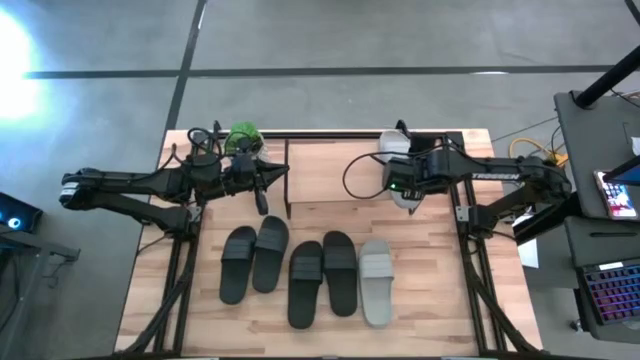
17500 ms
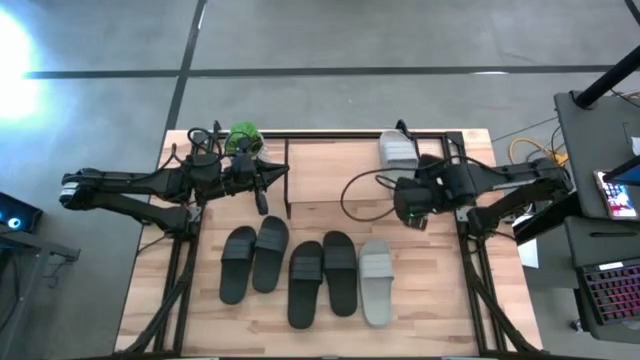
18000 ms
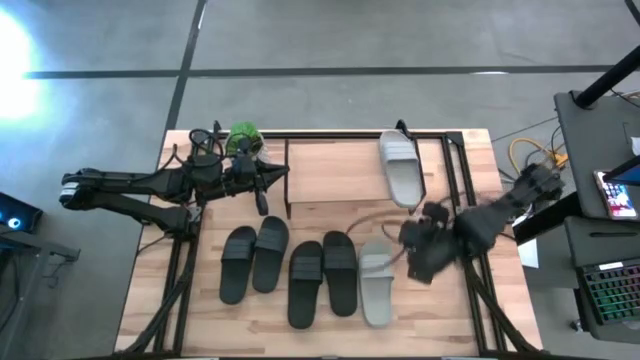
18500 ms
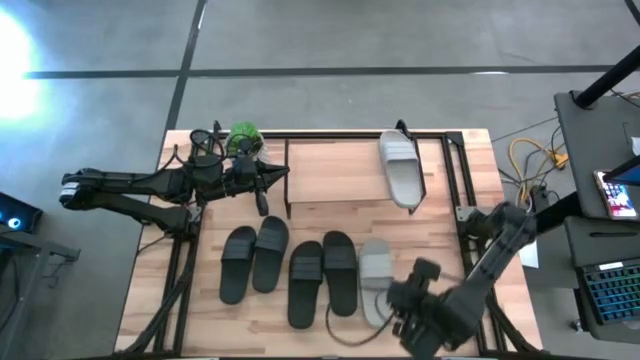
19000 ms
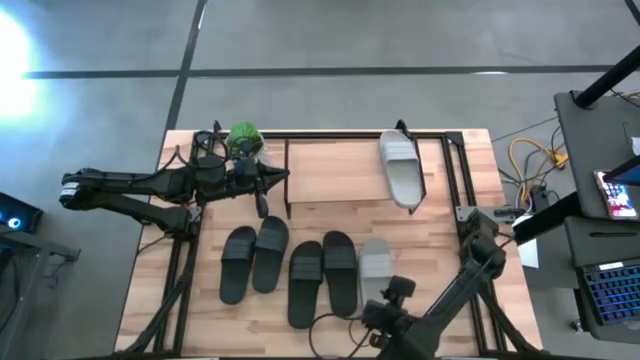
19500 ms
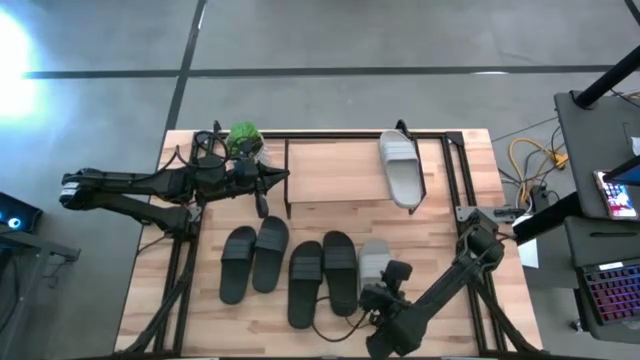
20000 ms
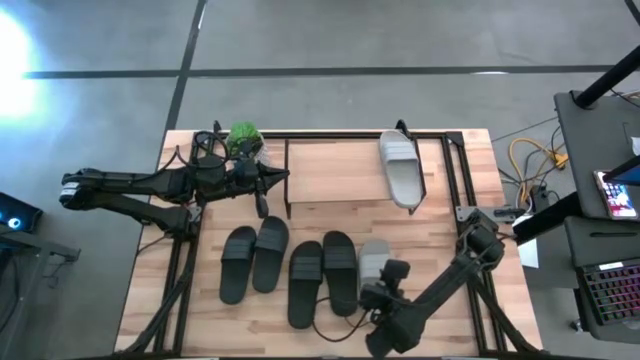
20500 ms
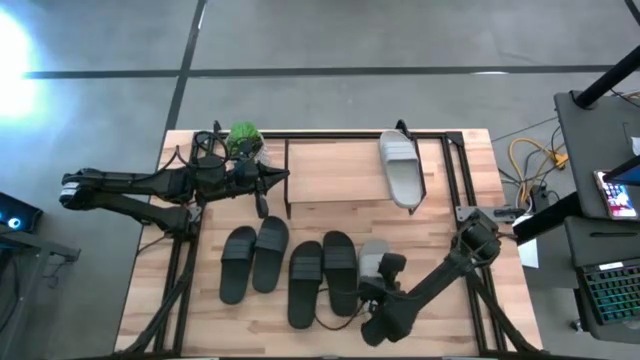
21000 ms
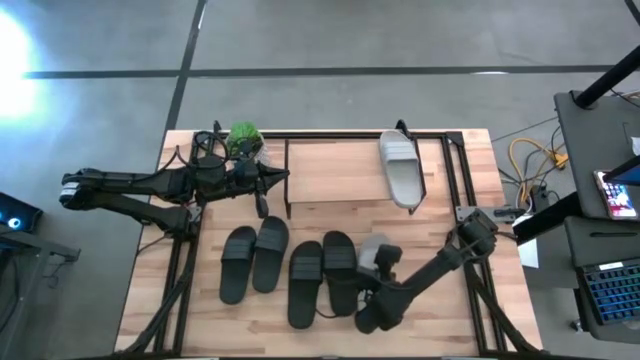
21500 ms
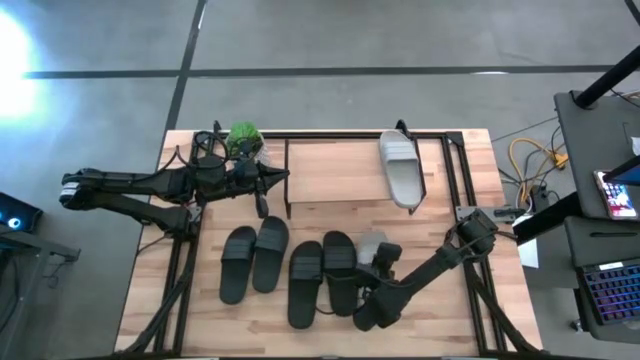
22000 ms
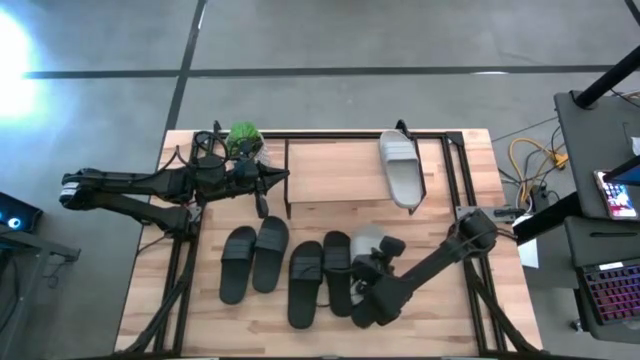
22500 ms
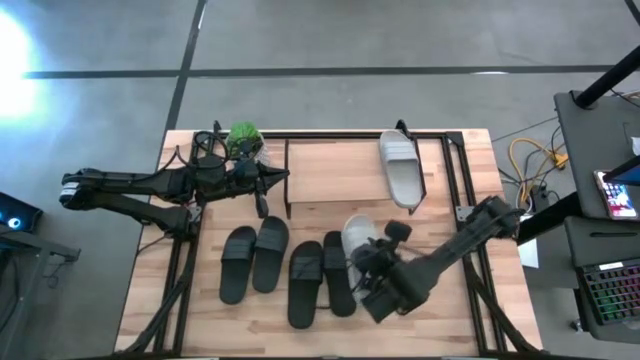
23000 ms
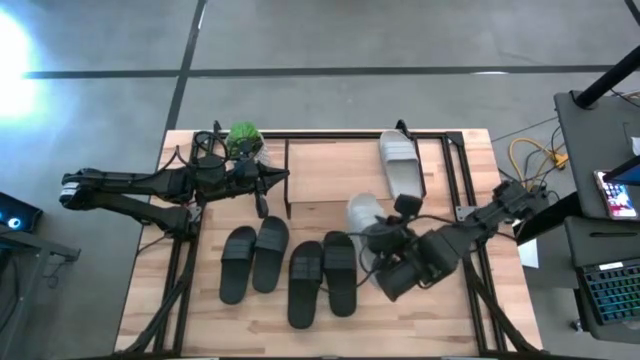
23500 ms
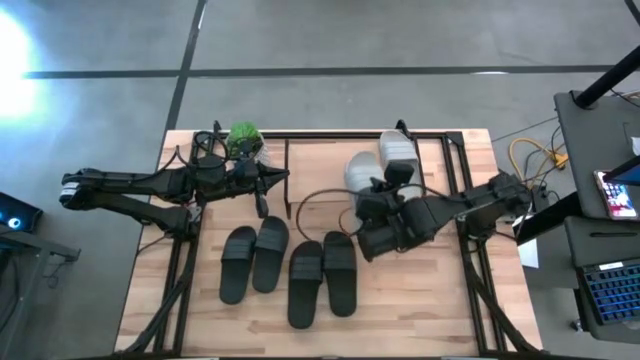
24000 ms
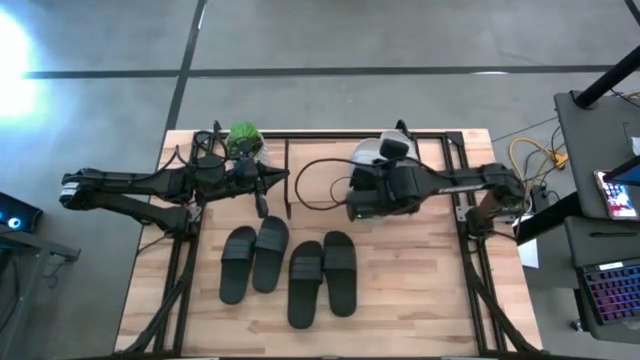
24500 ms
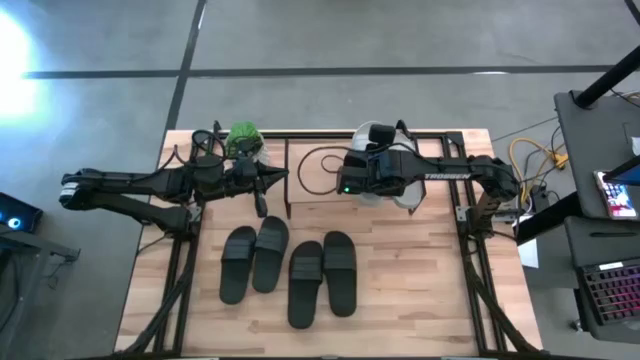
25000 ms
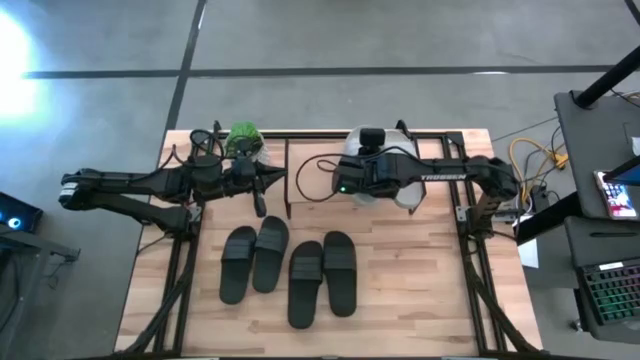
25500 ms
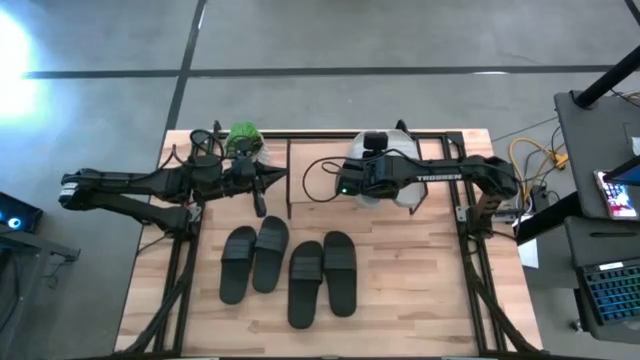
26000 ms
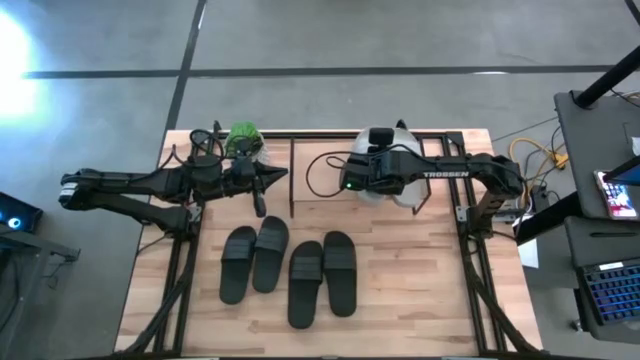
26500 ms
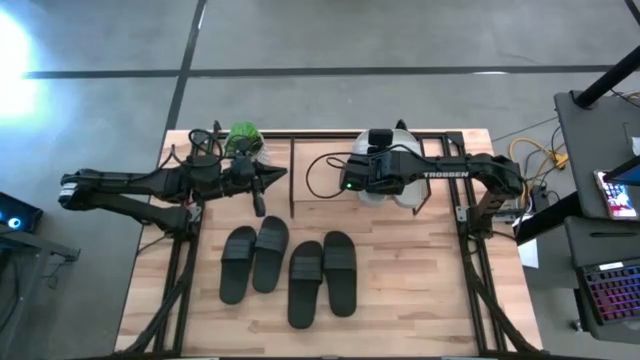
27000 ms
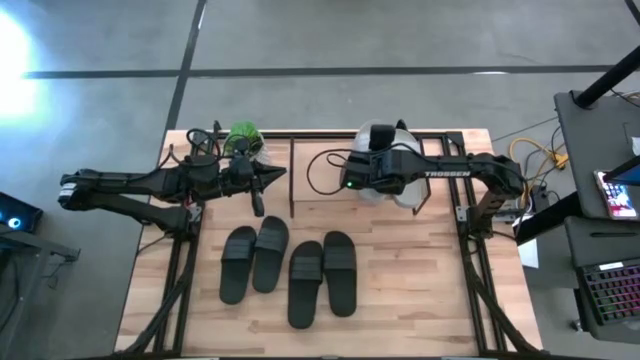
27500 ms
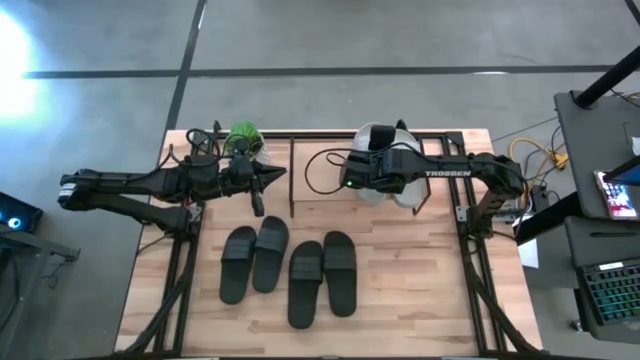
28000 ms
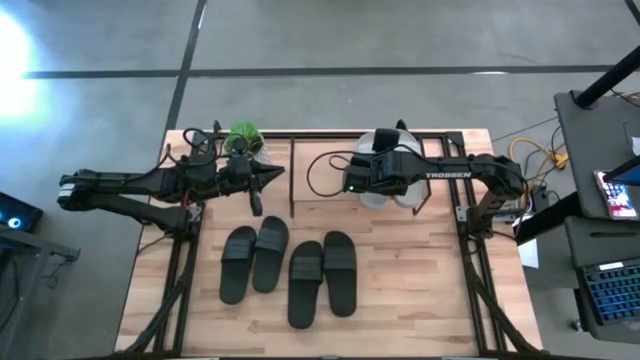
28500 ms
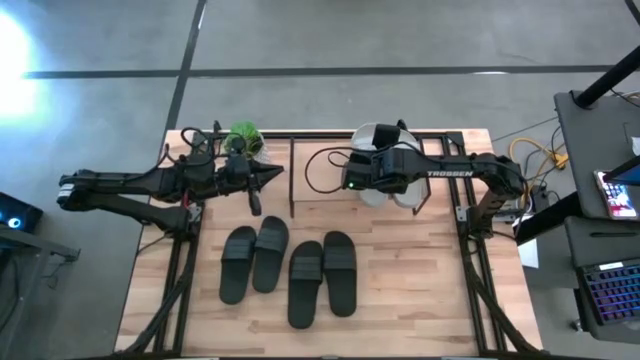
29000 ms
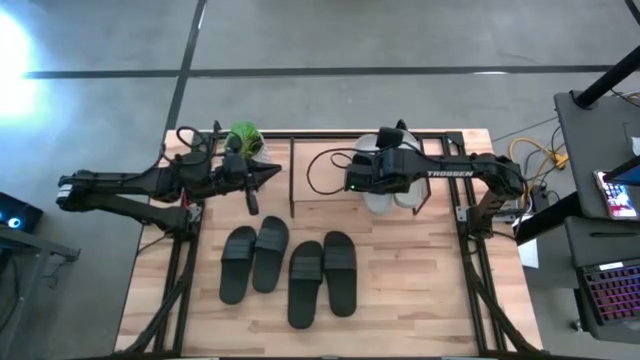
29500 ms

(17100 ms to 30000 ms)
Task: Pick and place slides into the shelf
Put the gray slide on the shelf

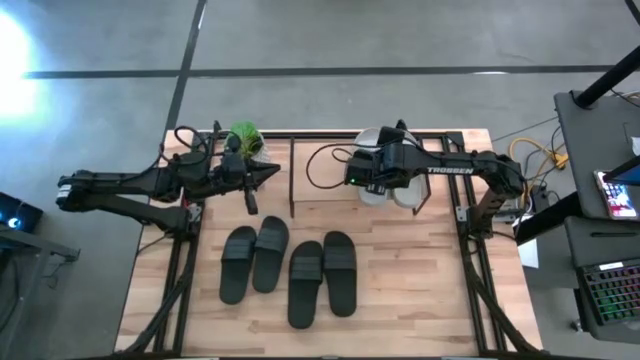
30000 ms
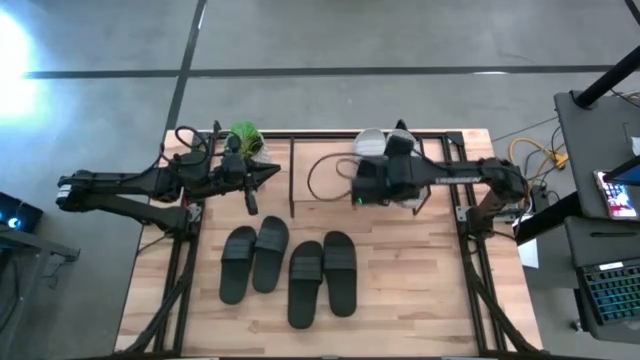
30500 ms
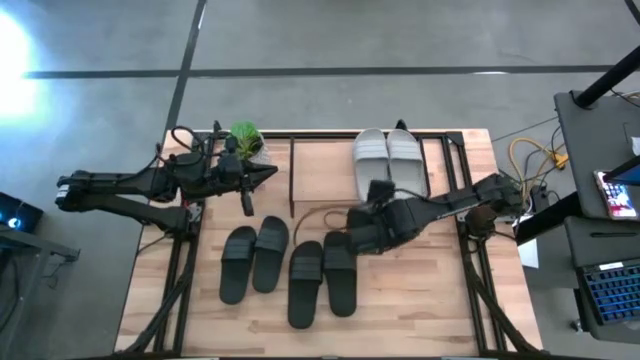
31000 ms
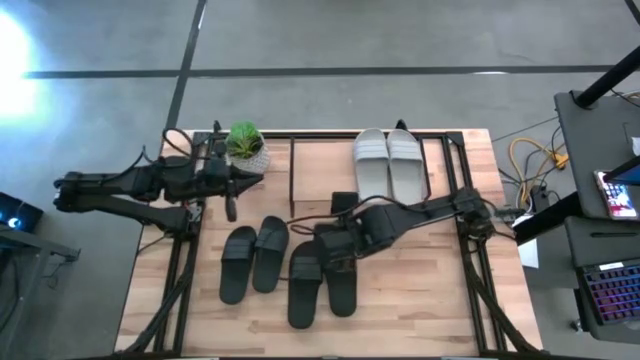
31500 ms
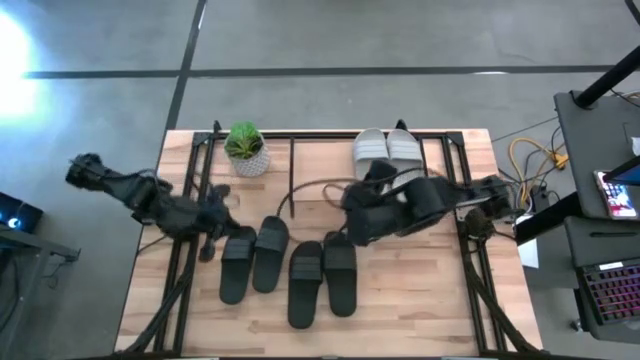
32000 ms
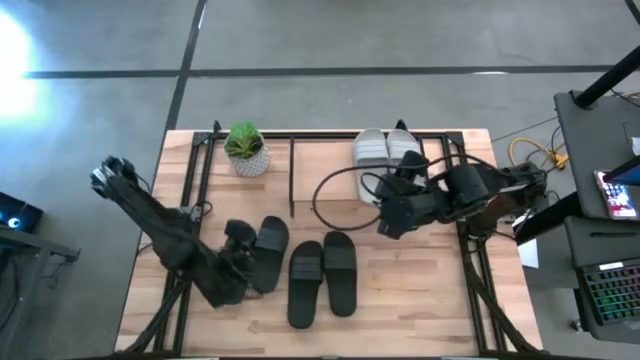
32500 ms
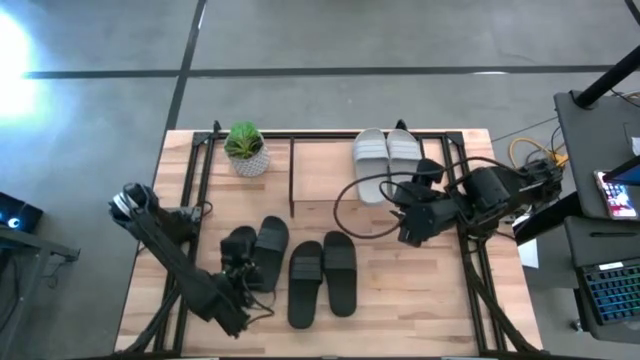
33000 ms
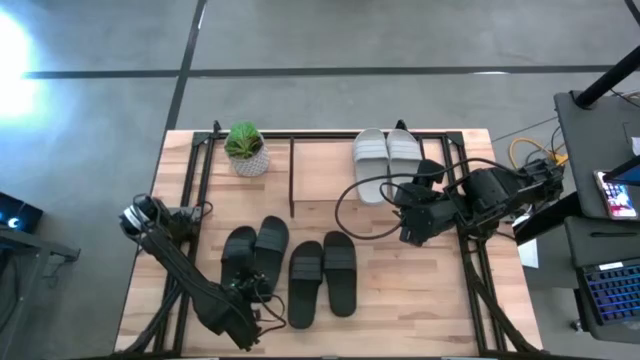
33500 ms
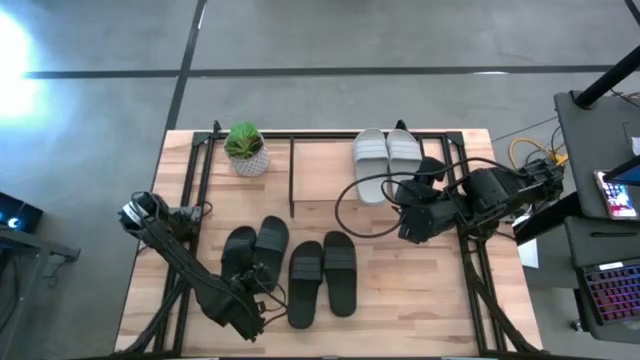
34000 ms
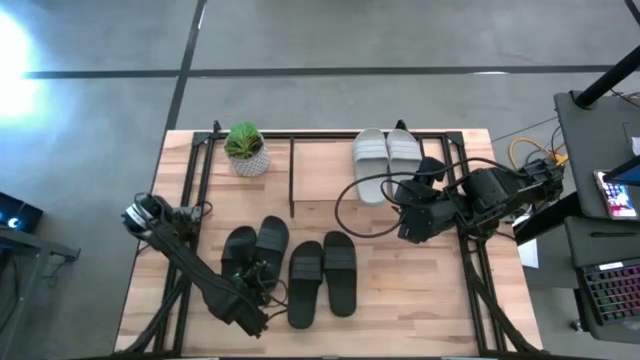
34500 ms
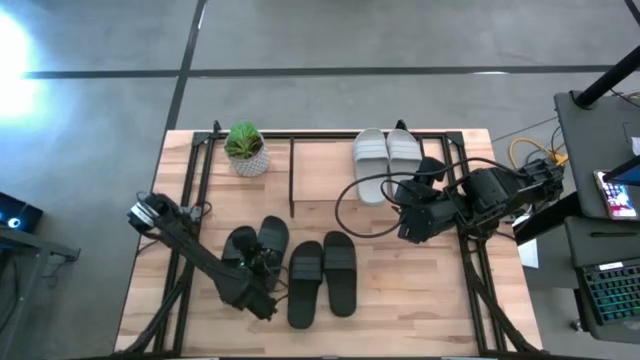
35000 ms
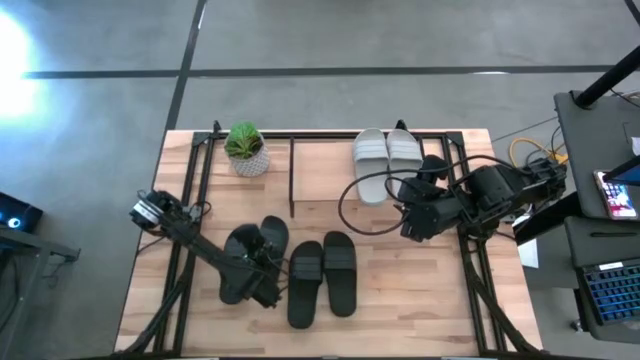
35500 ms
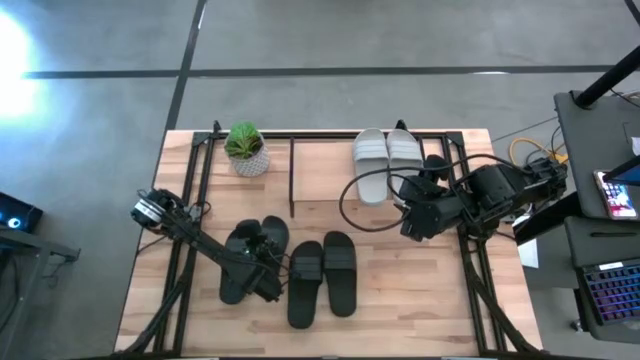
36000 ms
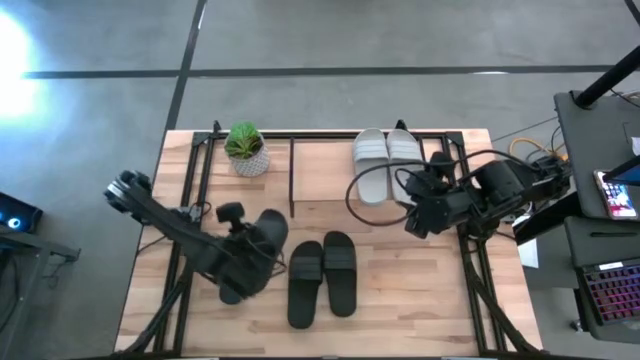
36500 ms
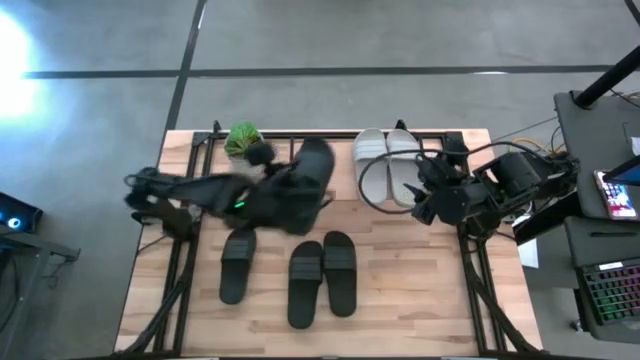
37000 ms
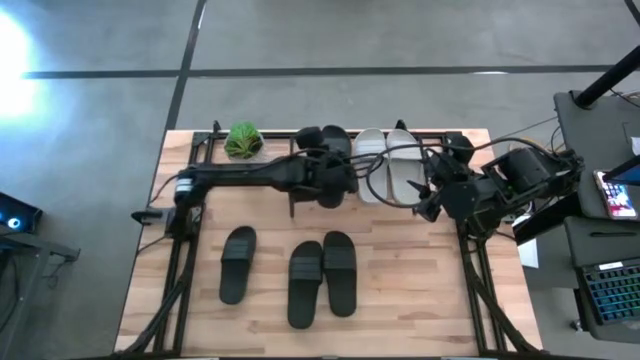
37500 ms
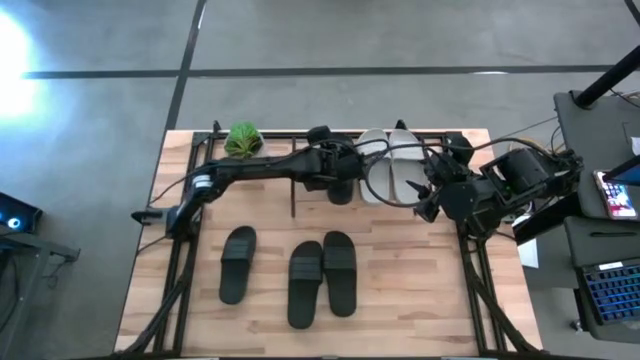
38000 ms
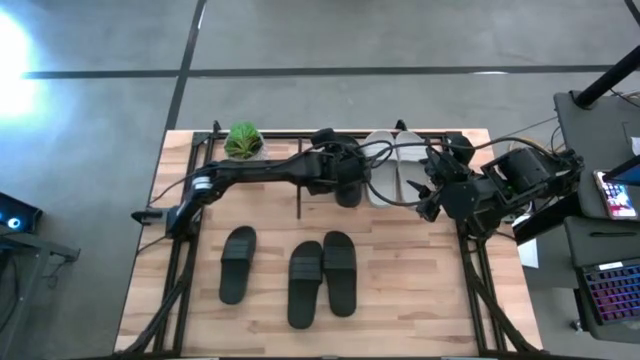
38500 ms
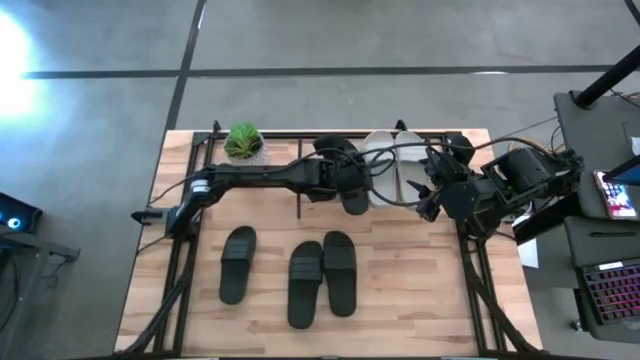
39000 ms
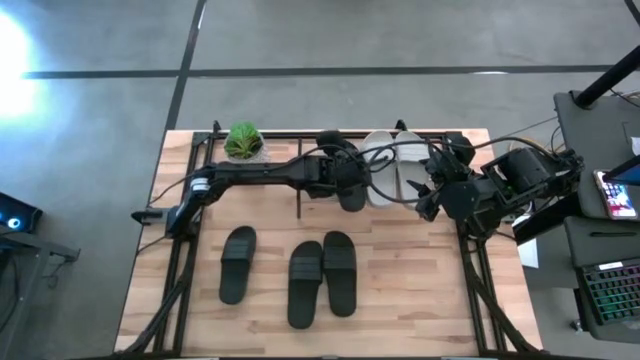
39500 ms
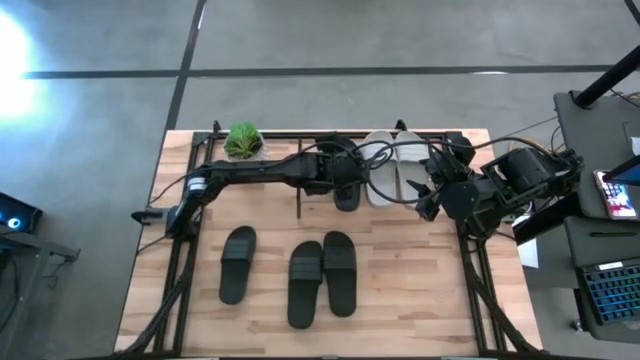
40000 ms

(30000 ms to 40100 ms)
Put the black slide on the shelf
